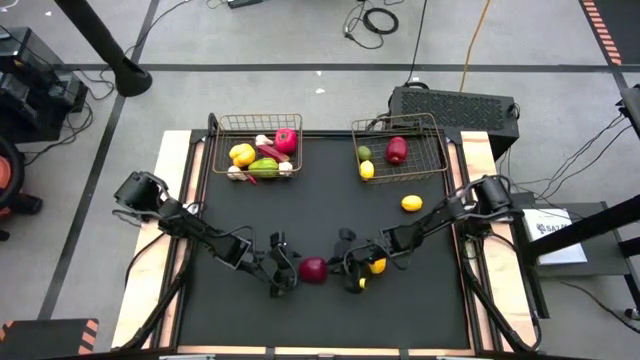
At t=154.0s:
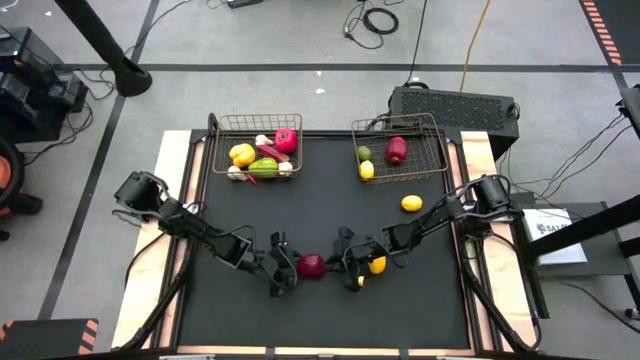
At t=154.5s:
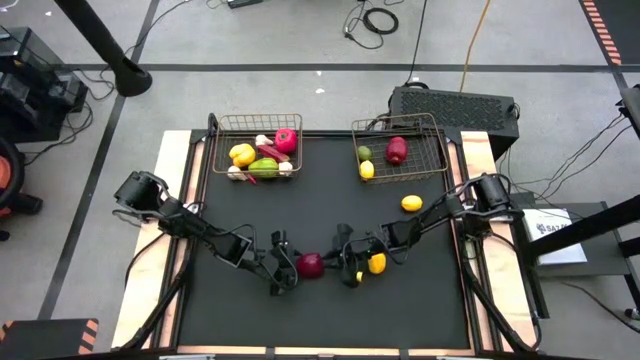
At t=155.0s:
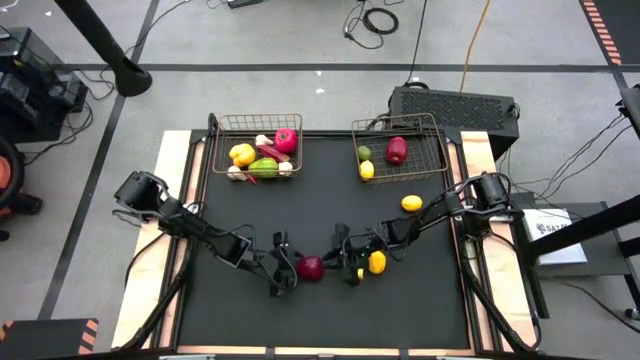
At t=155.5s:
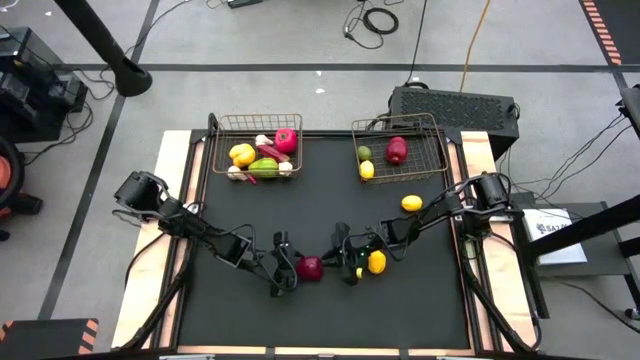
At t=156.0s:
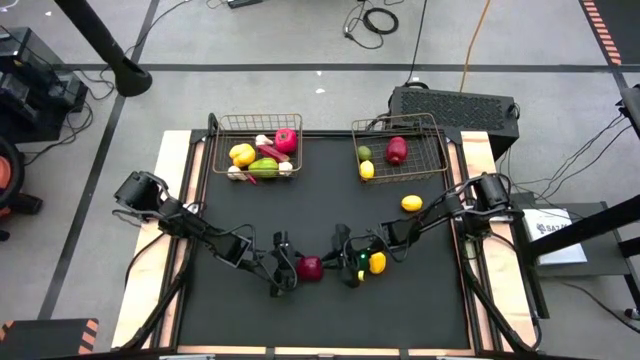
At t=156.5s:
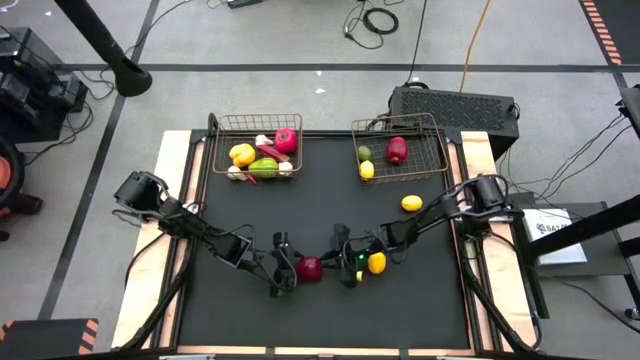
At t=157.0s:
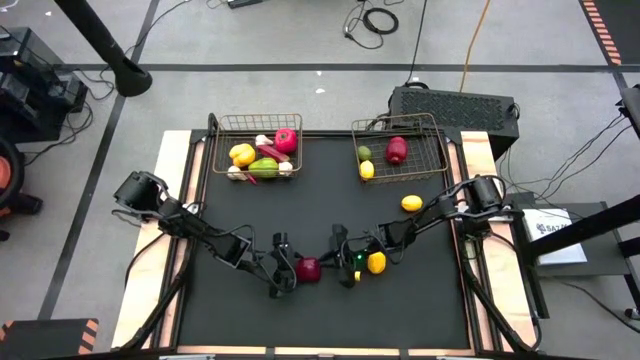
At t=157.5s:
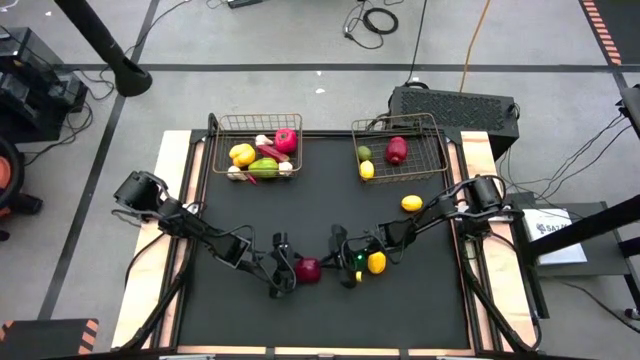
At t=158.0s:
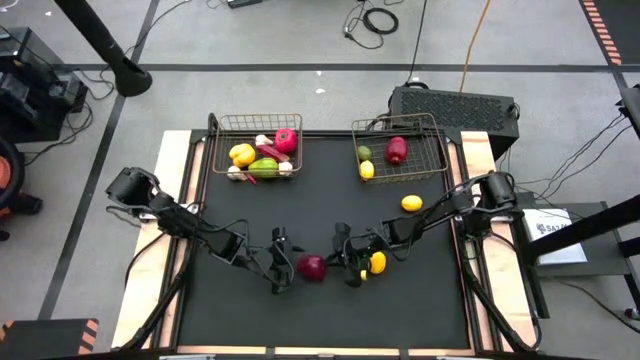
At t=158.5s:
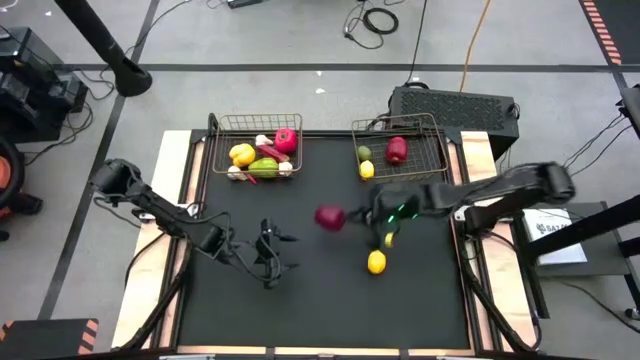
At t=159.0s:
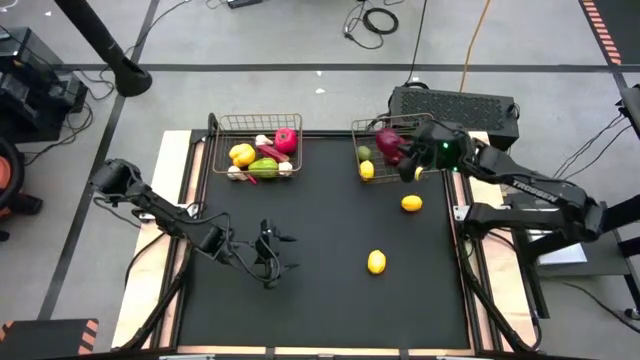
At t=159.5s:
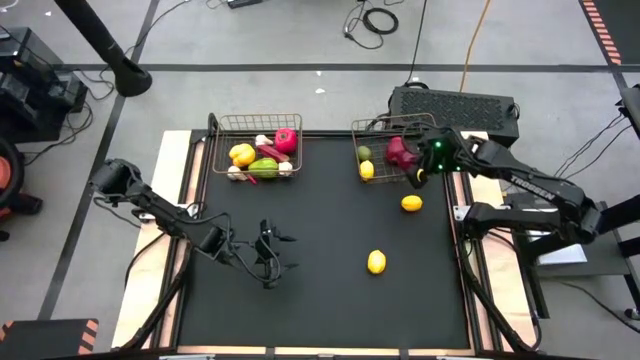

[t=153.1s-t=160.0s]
Task: Sort produce into baskets
Put the red apple into the right wire basket

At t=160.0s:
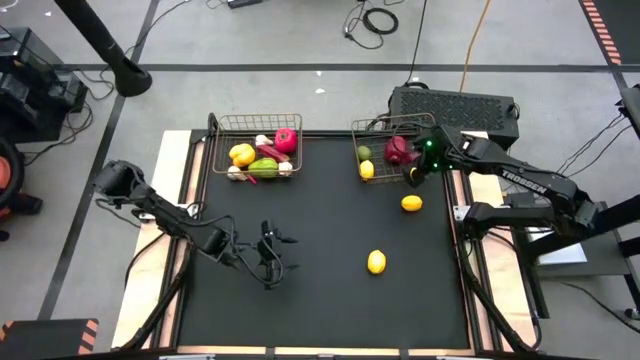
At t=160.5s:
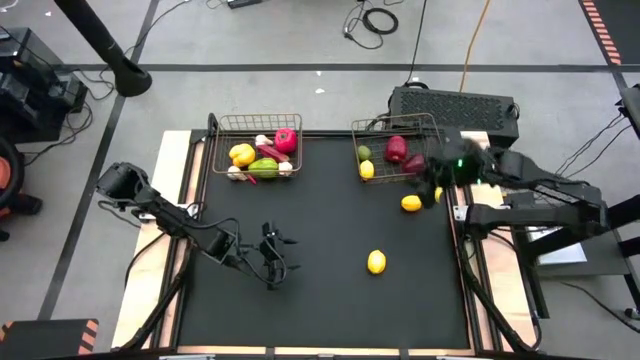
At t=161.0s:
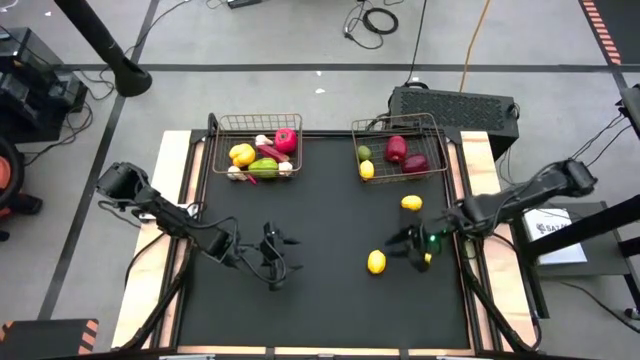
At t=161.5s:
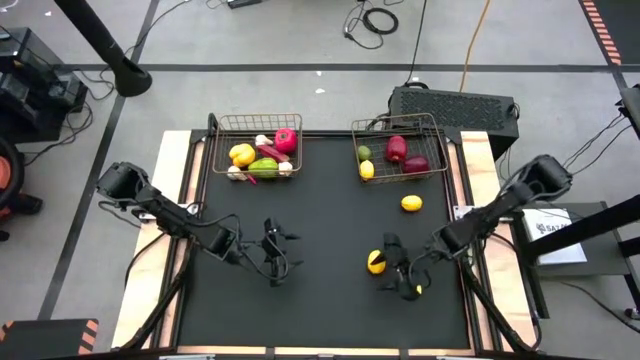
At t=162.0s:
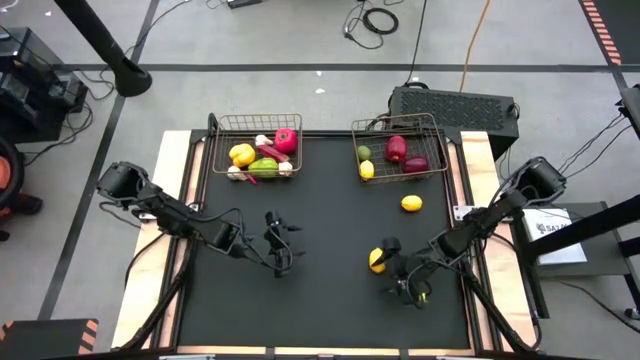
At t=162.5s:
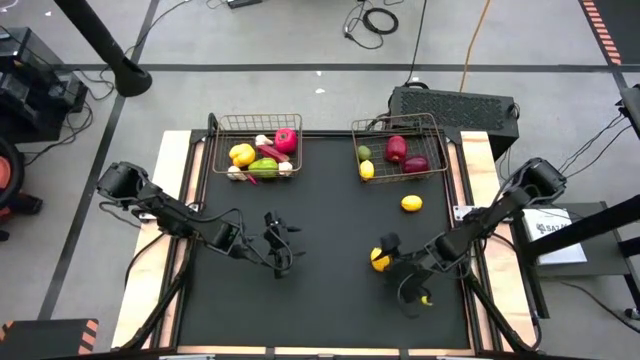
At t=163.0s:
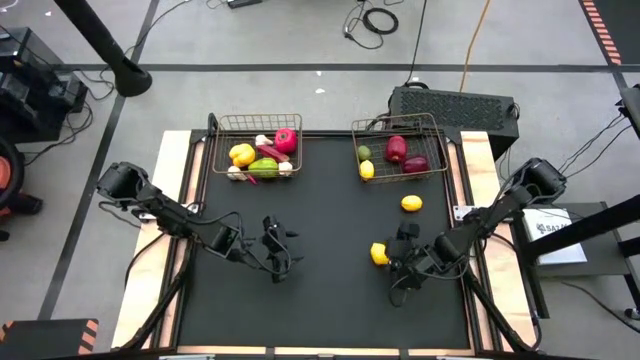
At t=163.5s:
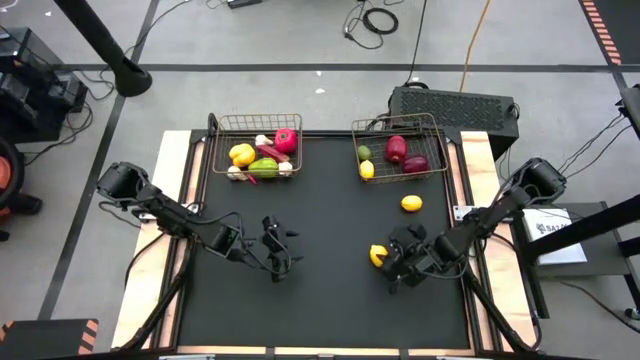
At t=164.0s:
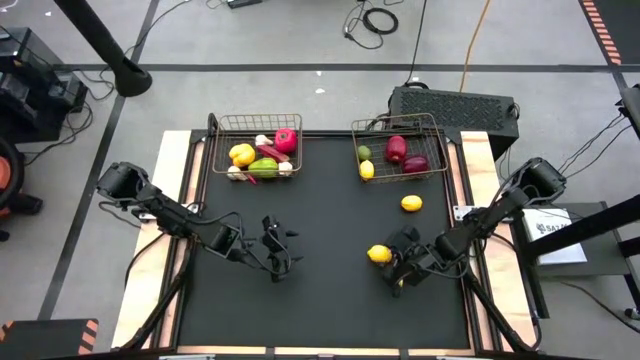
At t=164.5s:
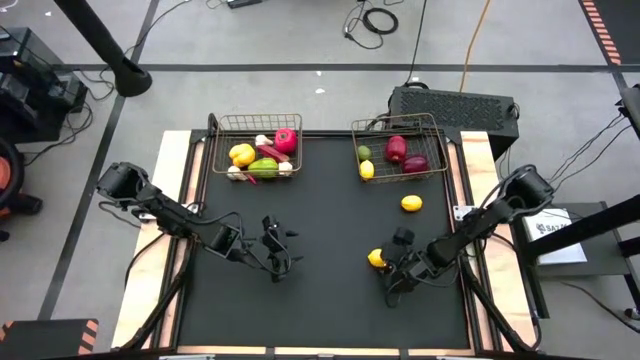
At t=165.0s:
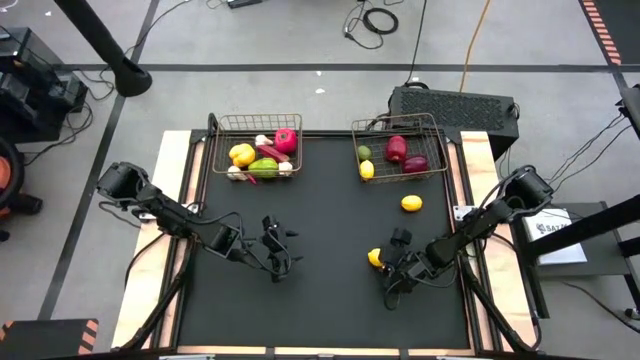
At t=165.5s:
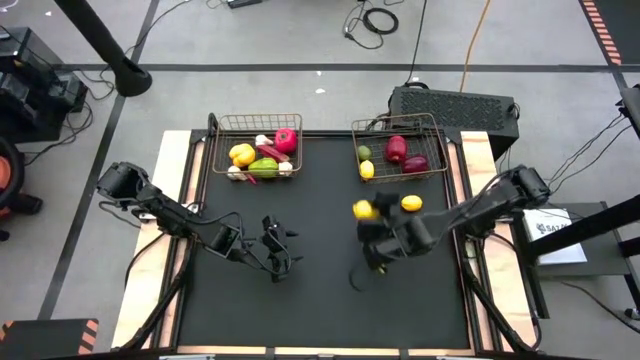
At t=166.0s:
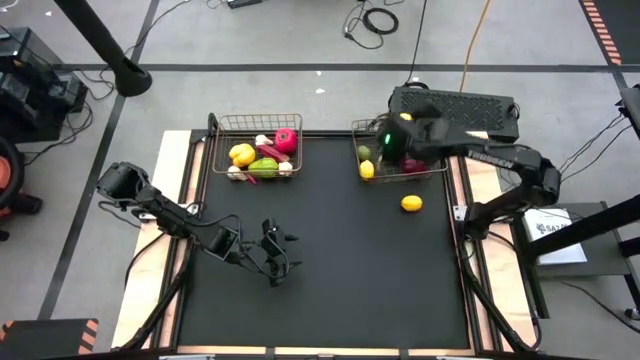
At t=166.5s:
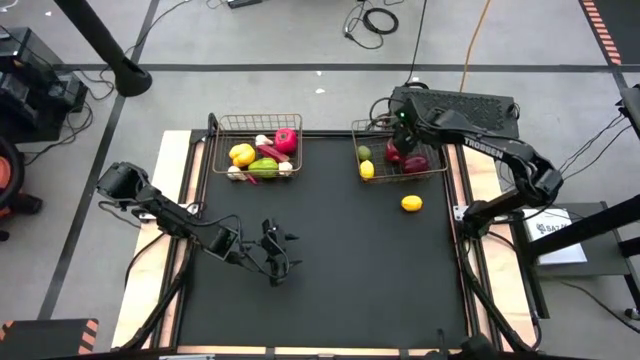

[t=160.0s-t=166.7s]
Put the bottom yellow lemon into the right wire basket

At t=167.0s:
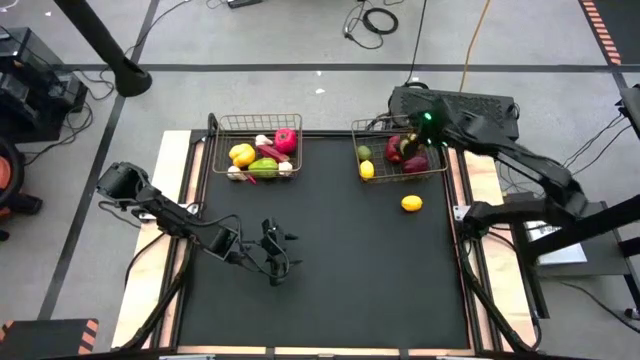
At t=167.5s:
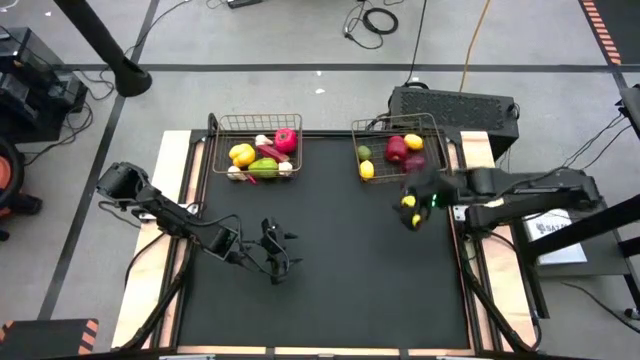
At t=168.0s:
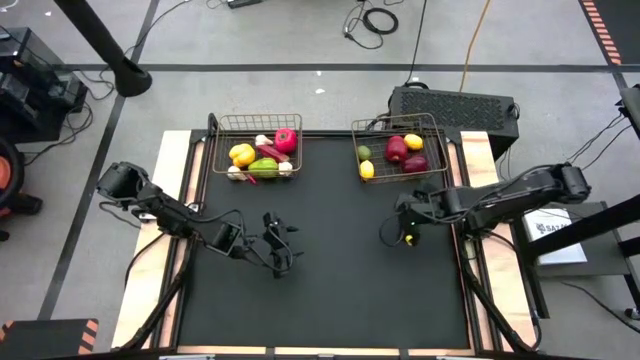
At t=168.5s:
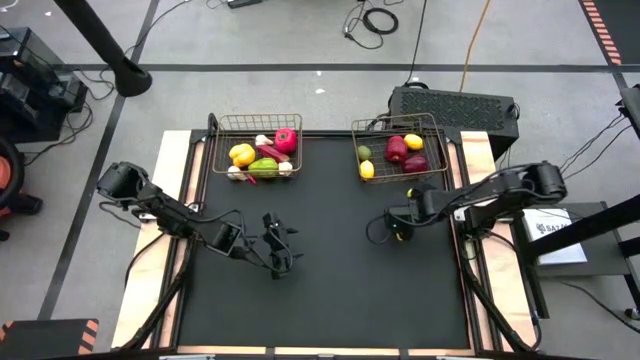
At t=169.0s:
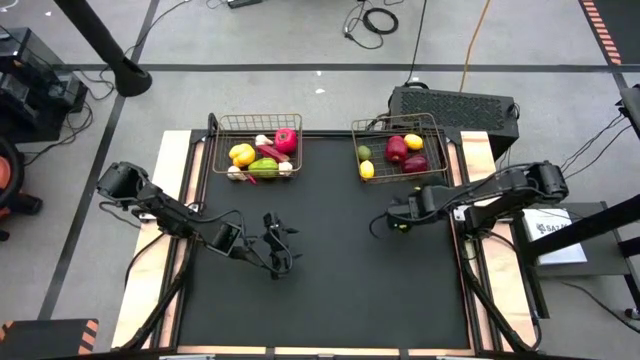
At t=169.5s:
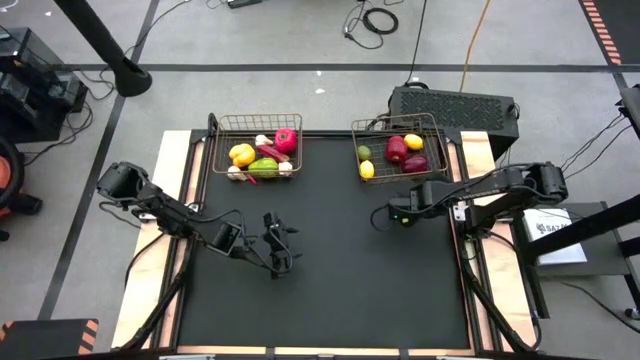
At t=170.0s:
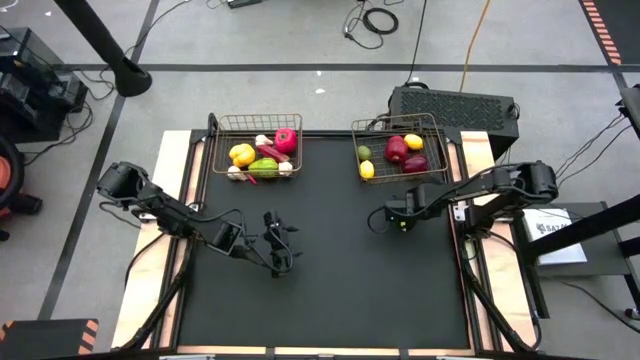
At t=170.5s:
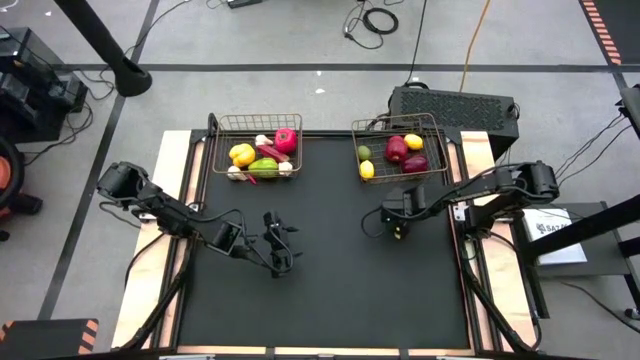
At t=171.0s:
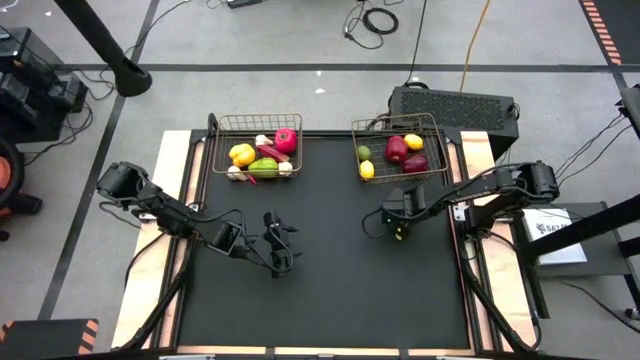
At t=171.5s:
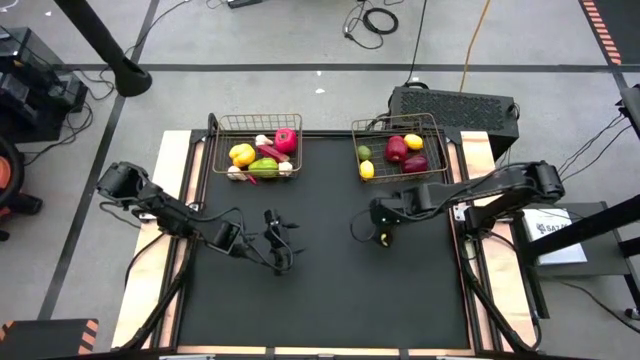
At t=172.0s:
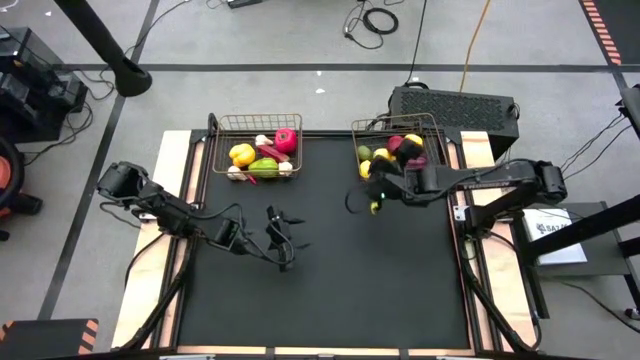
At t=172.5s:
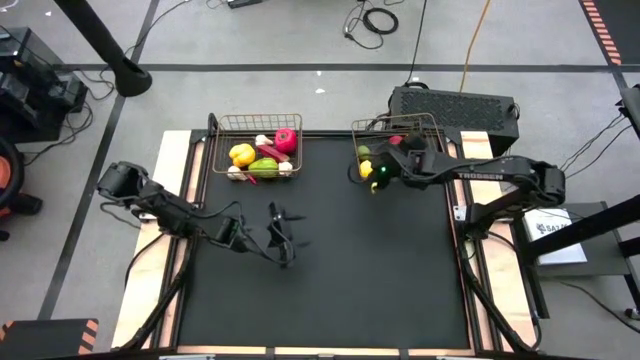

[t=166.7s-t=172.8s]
Put the yellow lemon into the right wire basket

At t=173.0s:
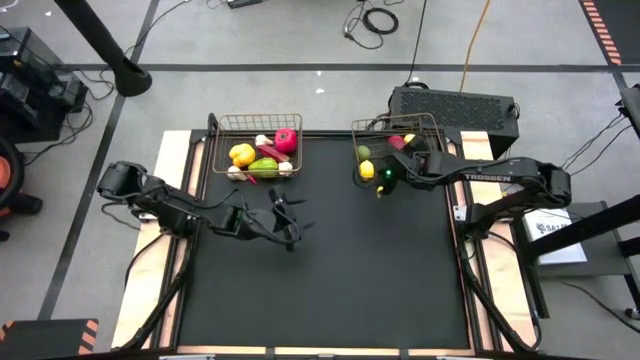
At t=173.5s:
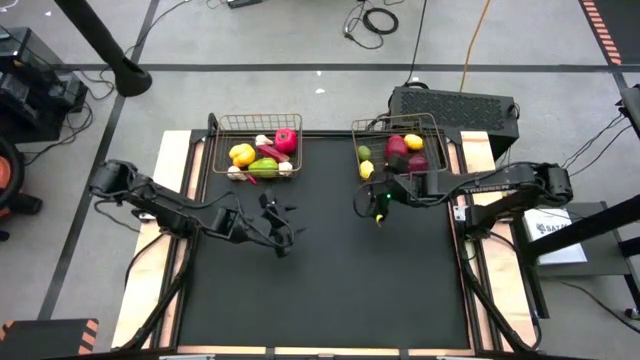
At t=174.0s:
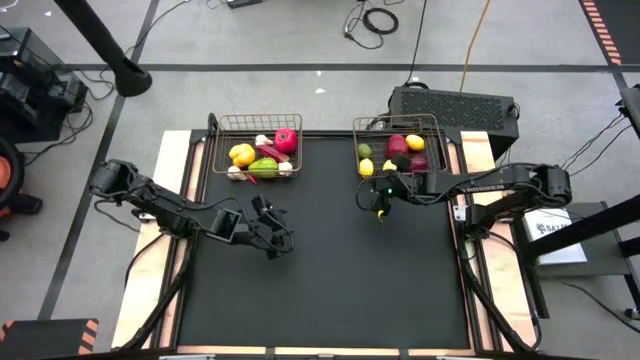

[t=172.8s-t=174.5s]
Adjust the right wire basket on the table
